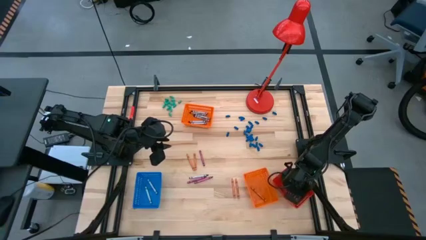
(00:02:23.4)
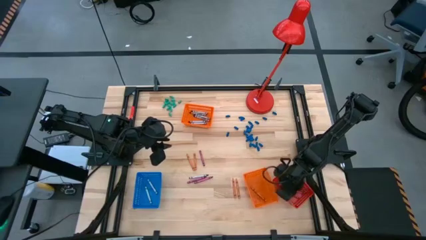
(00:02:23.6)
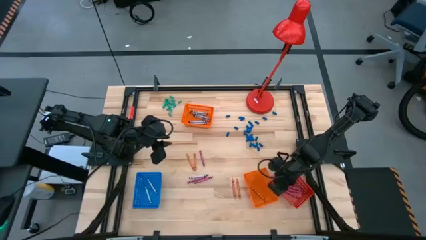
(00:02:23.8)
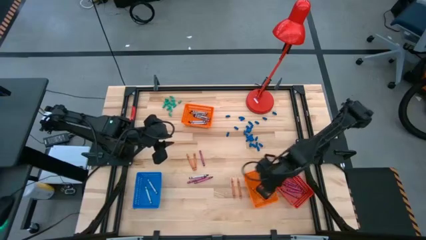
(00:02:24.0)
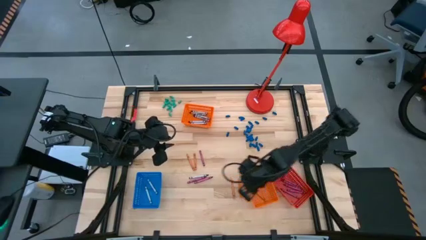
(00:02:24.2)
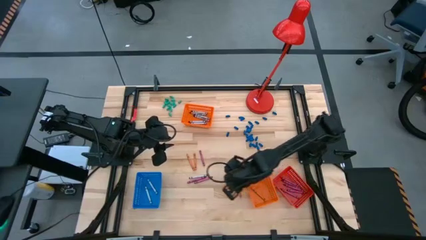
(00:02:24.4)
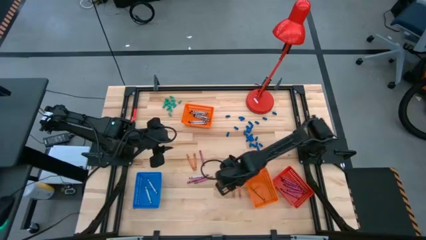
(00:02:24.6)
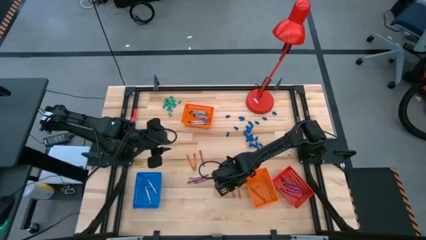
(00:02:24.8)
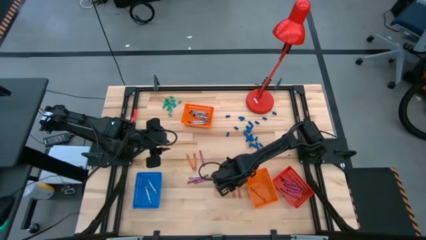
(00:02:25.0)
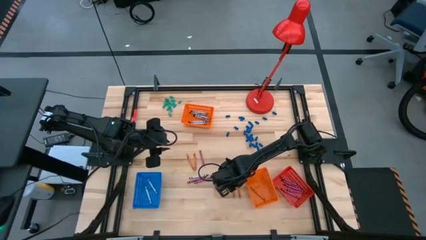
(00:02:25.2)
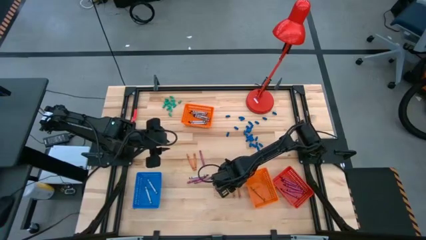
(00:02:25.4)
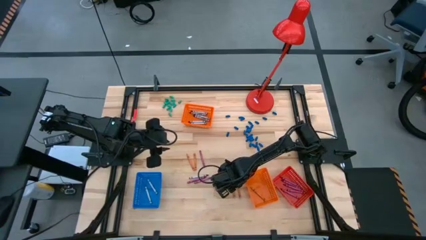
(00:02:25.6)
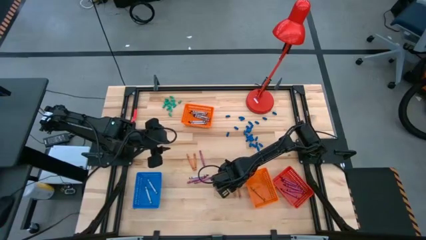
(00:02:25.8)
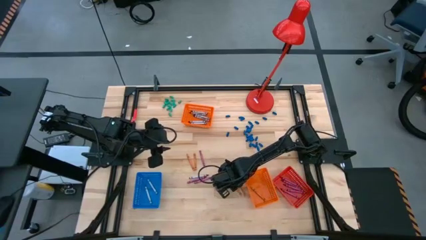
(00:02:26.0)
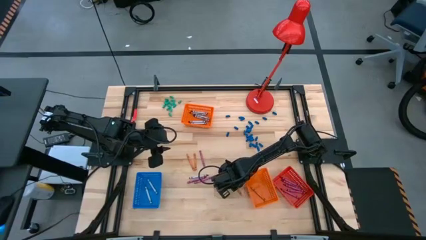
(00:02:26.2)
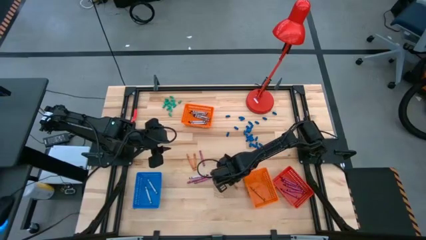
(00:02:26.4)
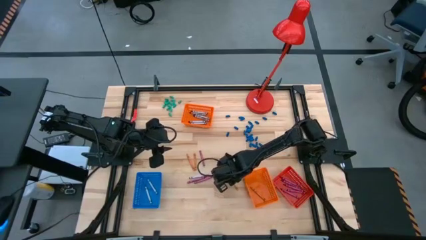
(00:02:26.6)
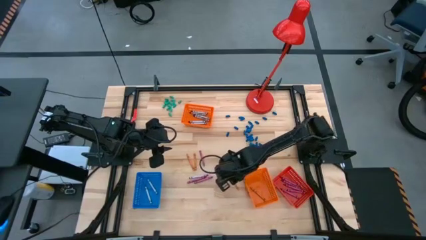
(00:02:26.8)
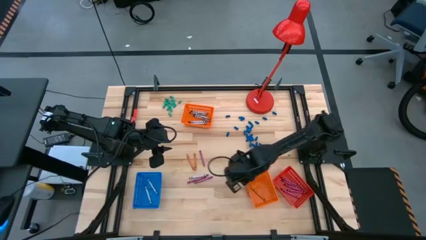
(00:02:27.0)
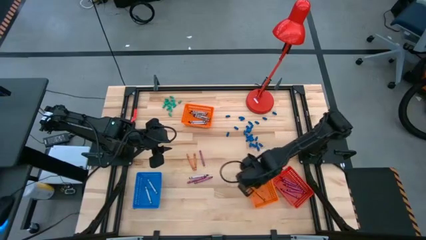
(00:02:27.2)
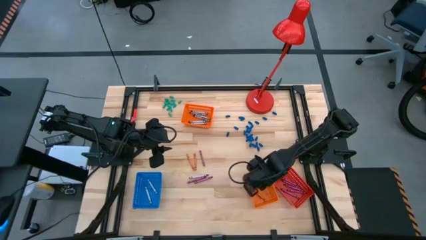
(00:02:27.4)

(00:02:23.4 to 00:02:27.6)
Task: Sort crayons
Put the orange crayon into the bottom orange bin

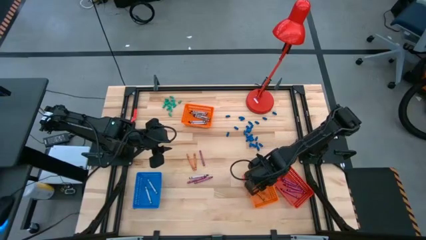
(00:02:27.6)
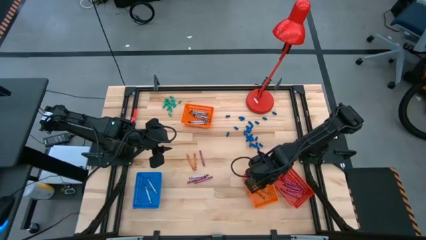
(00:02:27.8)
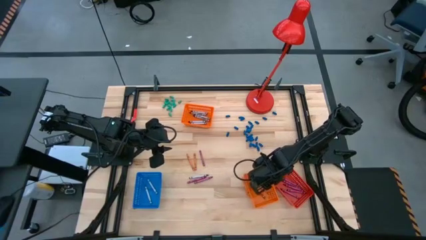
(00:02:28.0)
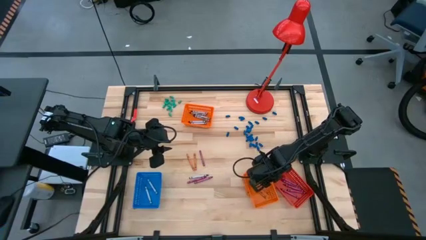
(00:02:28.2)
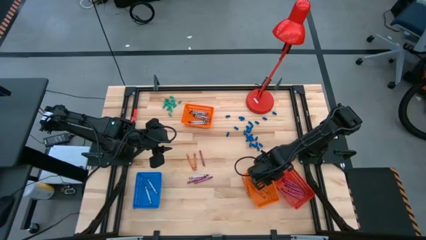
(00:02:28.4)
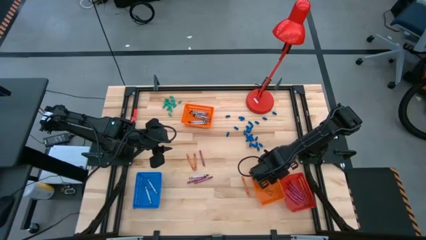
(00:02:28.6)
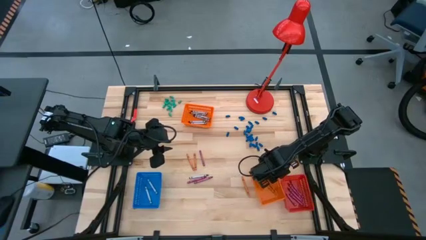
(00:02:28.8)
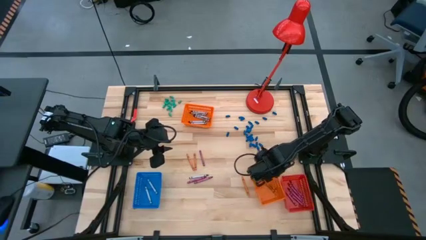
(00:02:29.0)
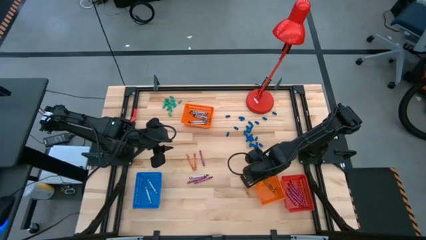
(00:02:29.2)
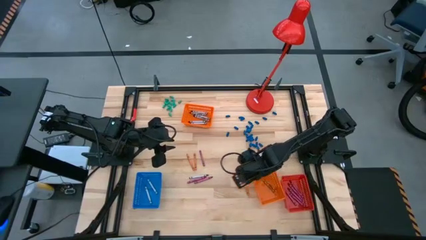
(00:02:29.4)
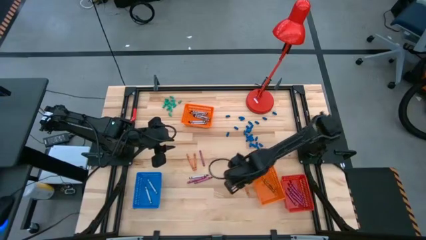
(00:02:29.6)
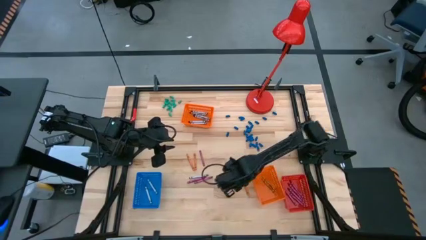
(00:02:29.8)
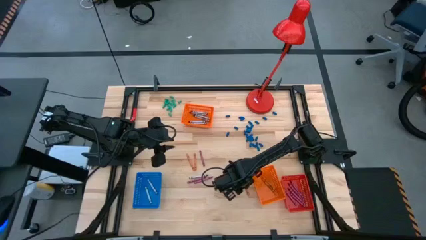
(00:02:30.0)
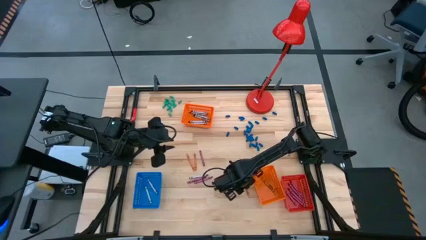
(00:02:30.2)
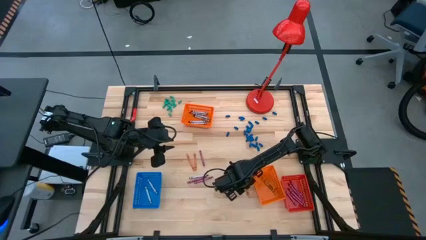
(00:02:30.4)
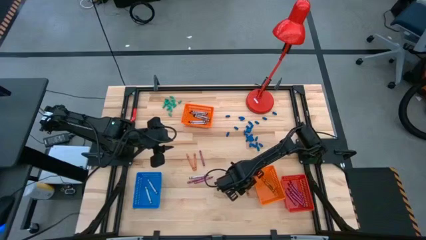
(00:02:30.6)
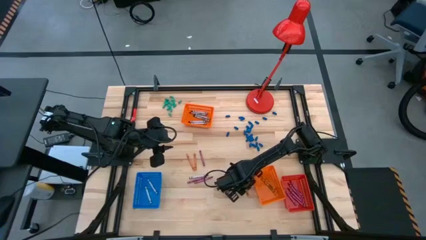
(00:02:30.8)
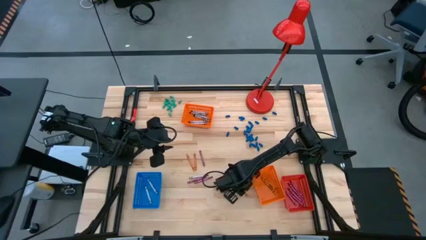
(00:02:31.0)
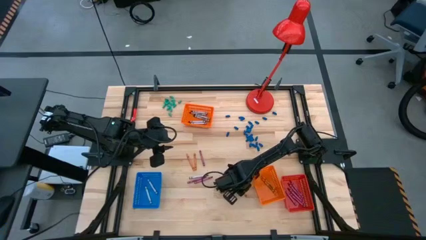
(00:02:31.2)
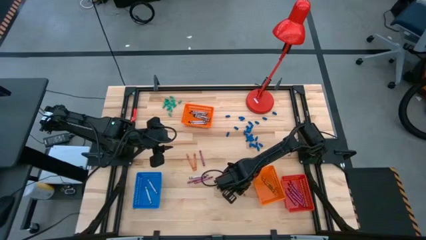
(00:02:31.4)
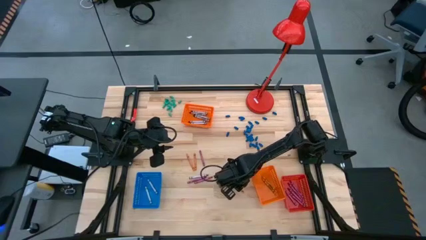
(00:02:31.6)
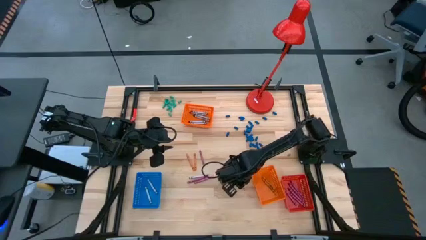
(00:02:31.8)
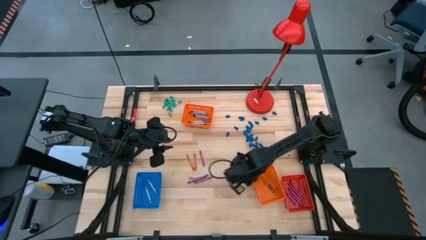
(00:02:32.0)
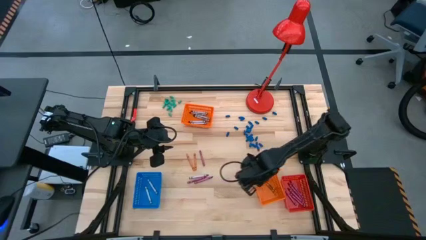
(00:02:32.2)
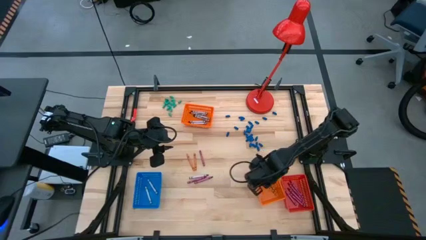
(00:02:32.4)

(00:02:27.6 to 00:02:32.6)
Put the orange crayon into the bottom orange bin

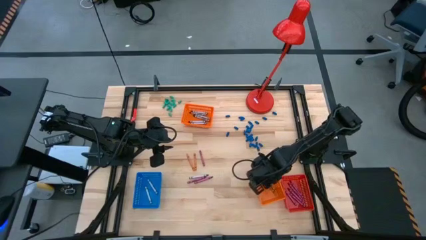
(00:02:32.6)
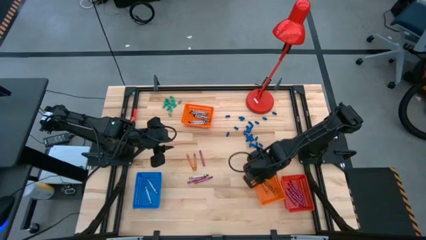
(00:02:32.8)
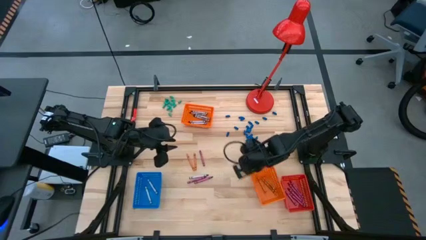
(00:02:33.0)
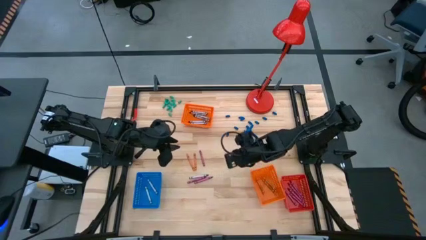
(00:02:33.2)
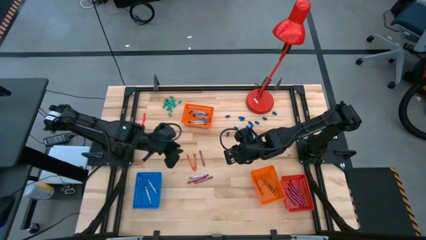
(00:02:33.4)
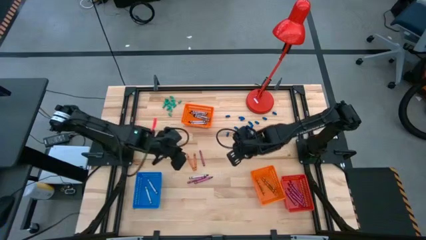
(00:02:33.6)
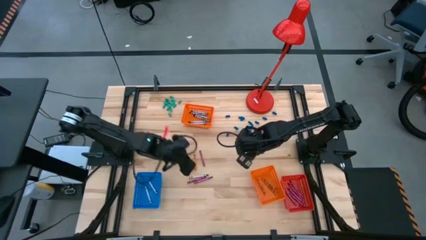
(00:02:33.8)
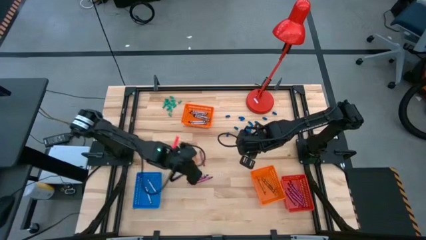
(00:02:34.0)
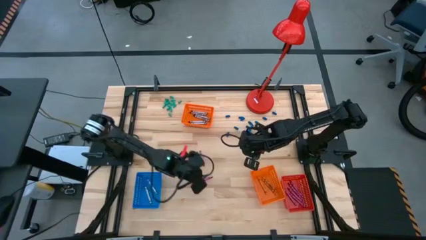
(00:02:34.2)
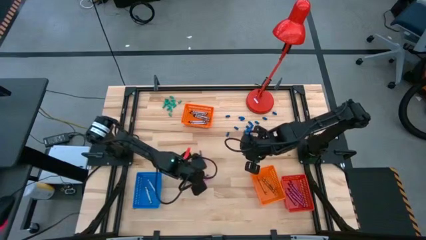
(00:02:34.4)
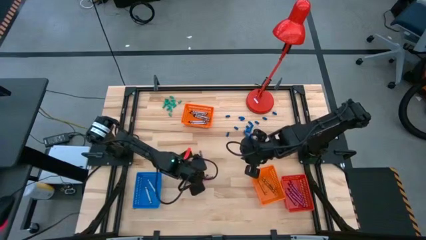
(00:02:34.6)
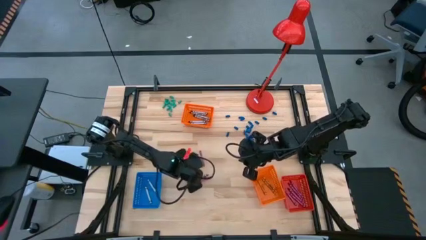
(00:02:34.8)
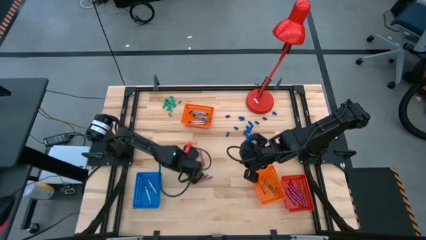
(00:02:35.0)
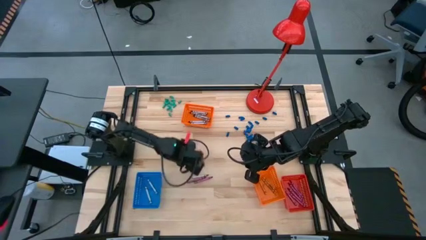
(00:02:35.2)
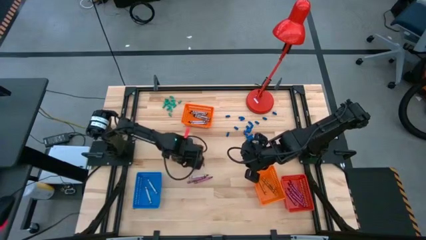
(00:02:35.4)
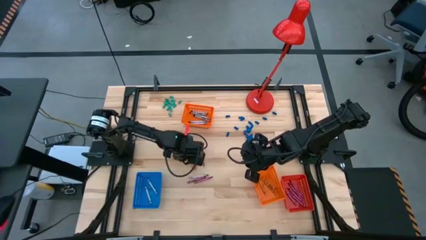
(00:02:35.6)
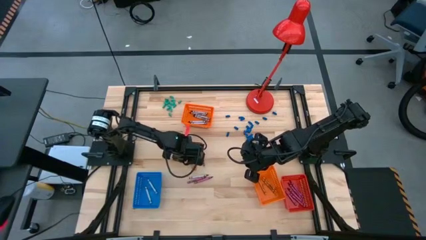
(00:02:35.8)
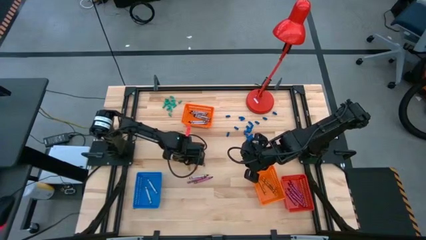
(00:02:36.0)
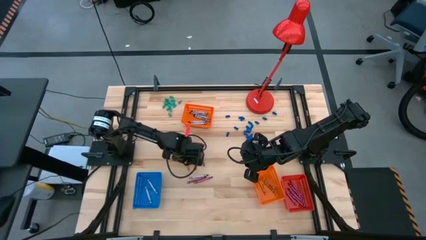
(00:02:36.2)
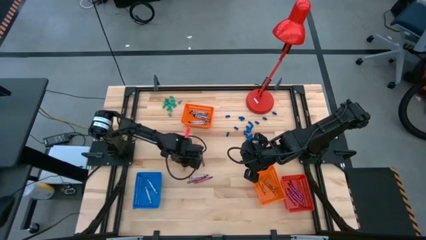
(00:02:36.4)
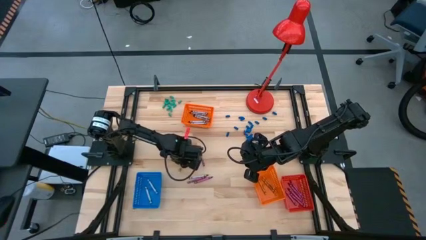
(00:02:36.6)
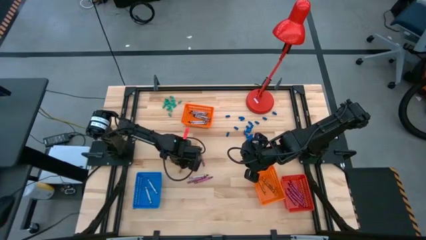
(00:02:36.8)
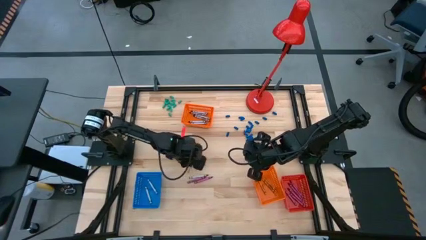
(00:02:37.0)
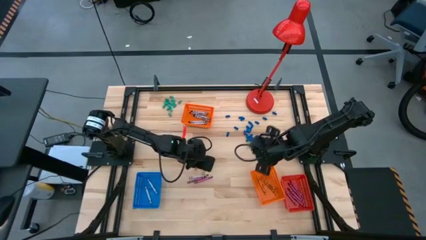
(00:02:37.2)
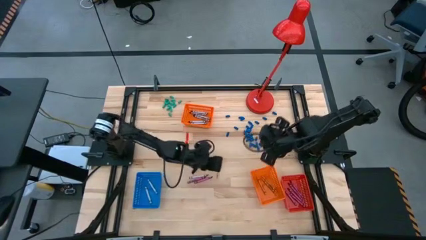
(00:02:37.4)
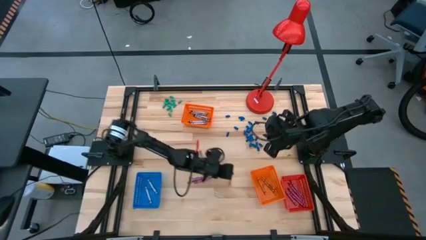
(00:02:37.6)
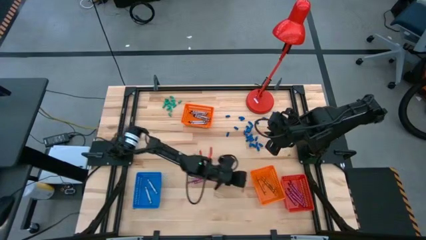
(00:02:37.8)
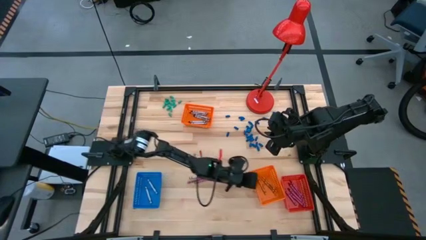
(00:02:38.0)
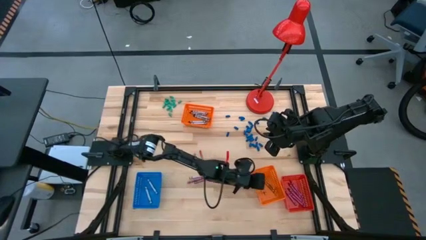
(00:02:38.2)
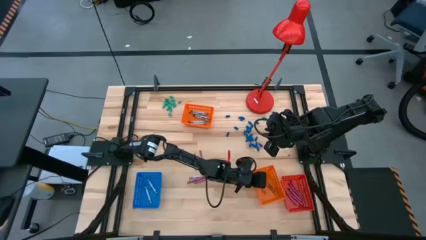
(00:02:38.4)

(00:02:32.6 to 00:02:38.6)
Put the orange crayon into the bottom orange bin
